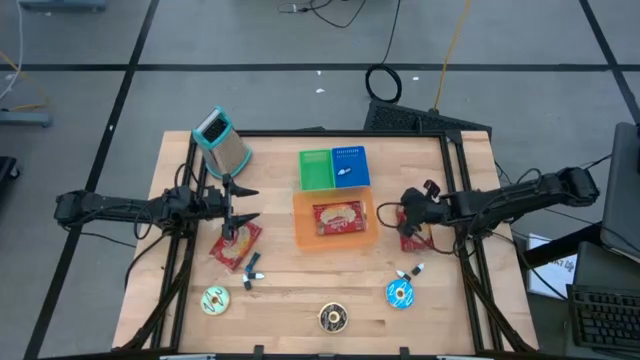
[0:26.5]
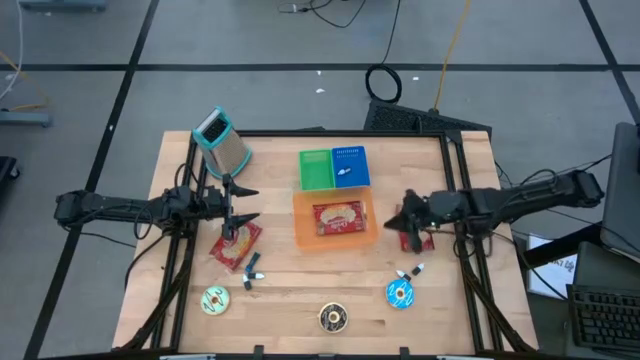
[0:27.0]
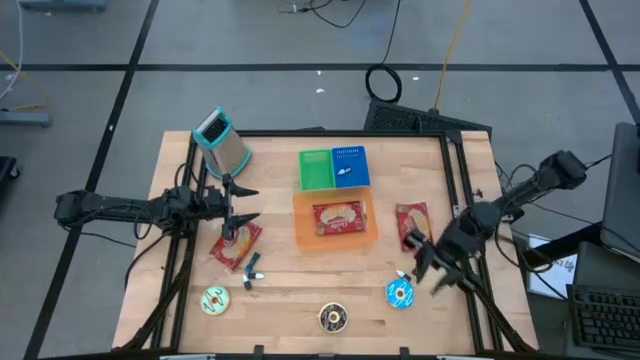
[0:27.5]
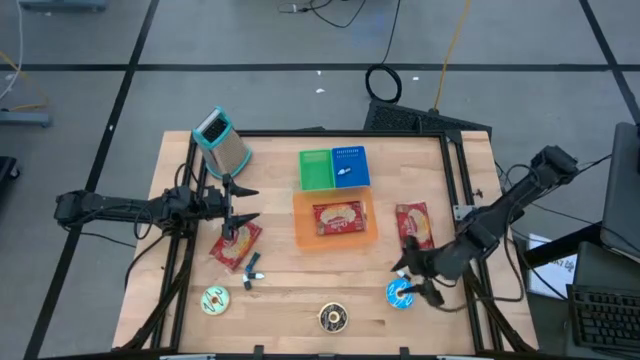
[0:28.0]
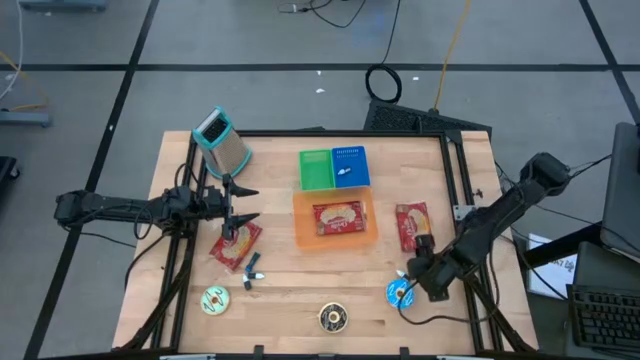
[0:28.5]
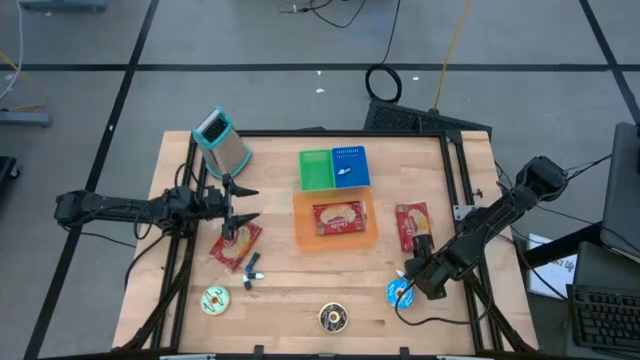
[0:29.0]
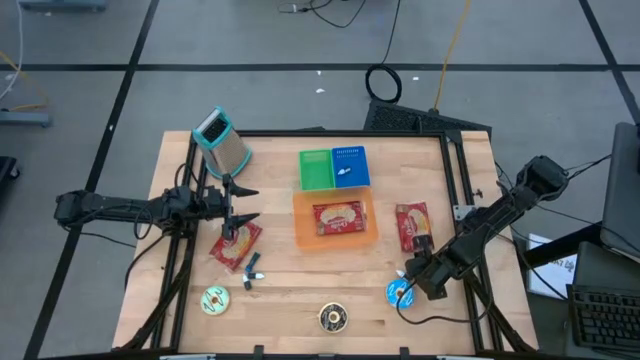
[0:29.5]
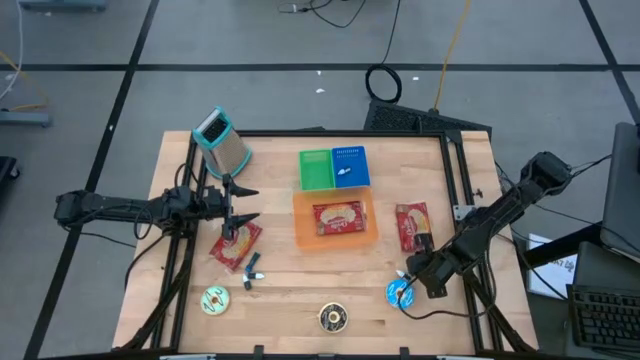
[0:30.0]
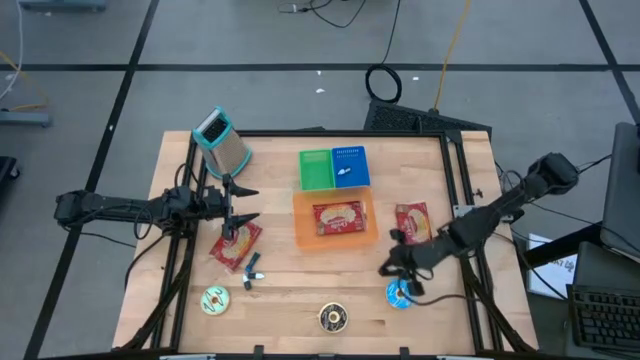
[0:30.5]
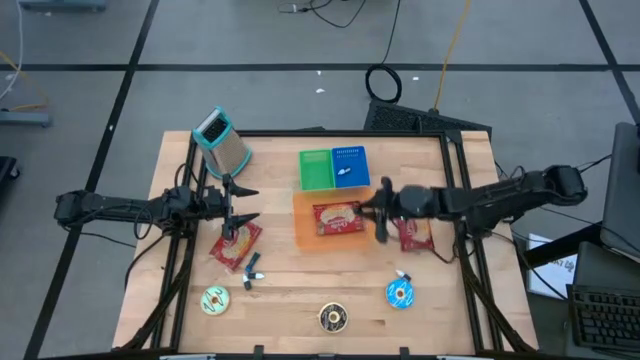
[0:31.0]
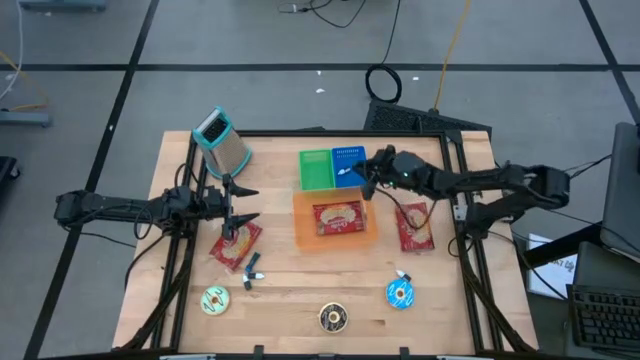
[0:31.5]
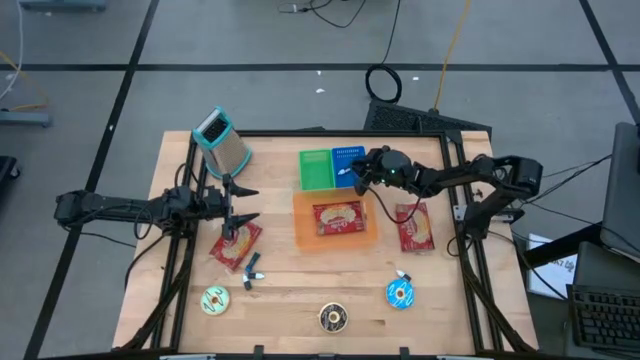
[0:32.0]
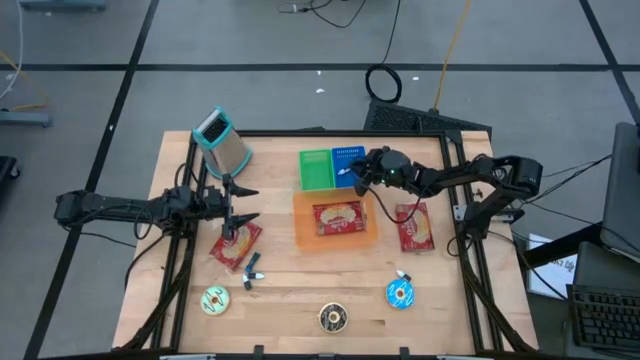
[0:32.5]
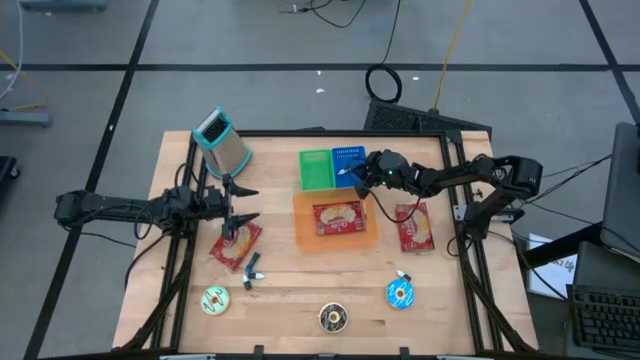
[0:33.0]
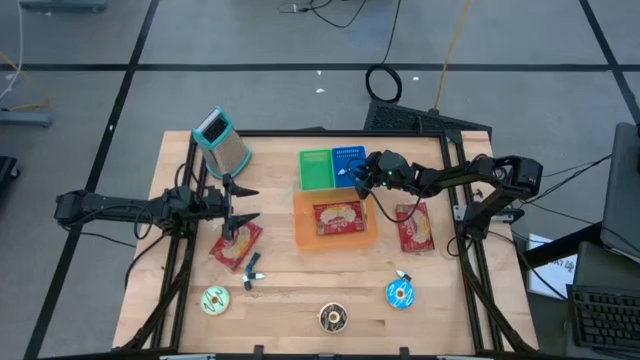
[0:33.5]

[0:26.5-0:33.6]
Put the right black food coloring bottle into the blue bin

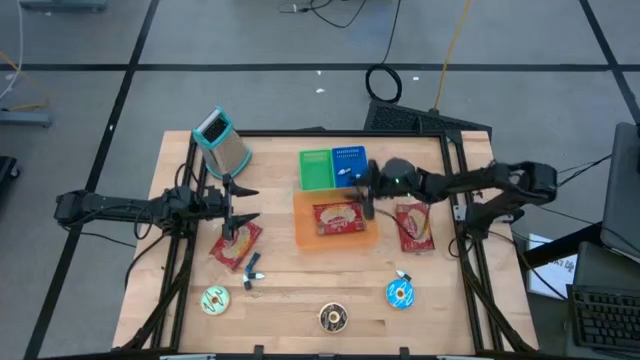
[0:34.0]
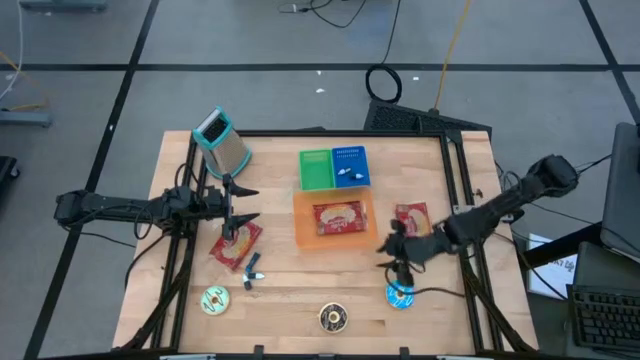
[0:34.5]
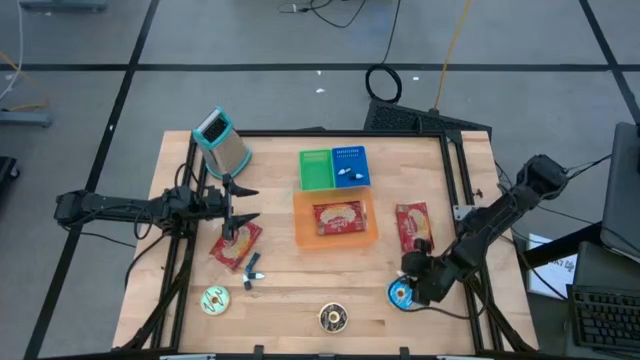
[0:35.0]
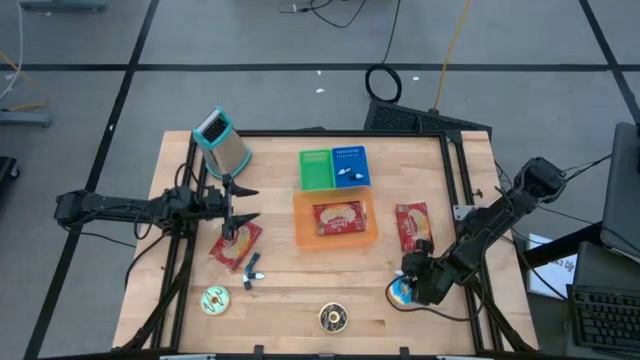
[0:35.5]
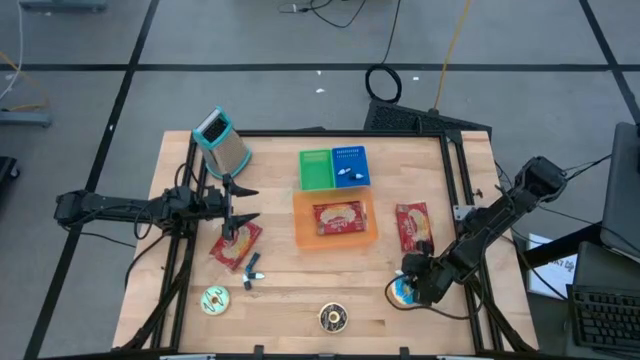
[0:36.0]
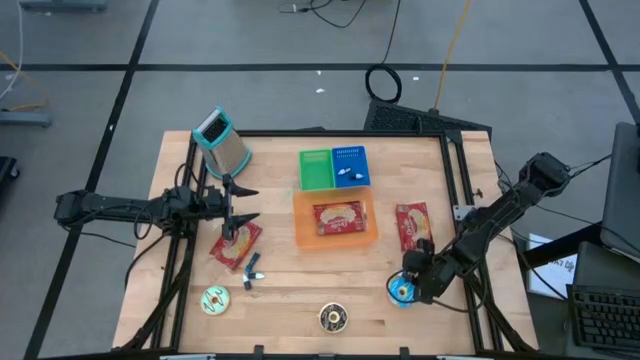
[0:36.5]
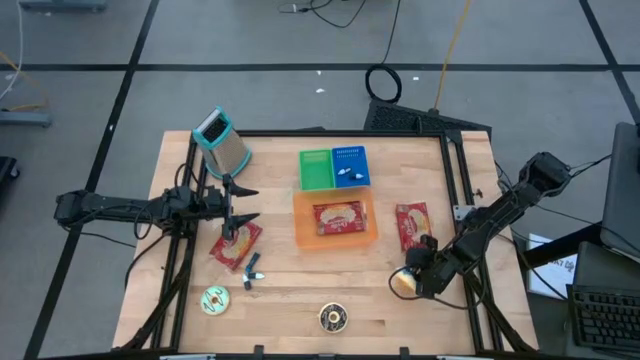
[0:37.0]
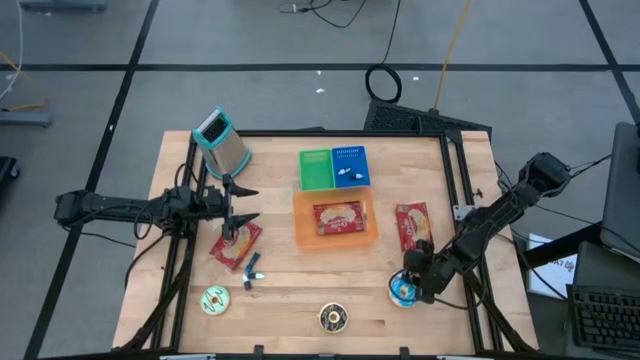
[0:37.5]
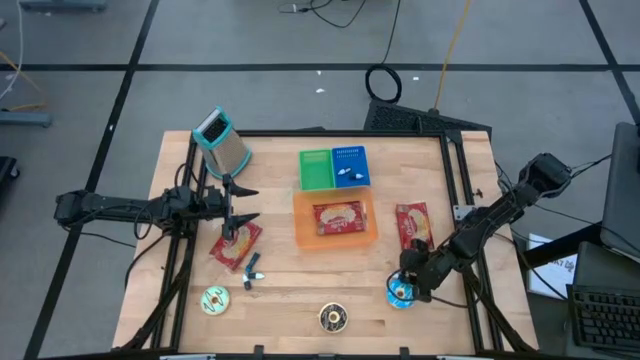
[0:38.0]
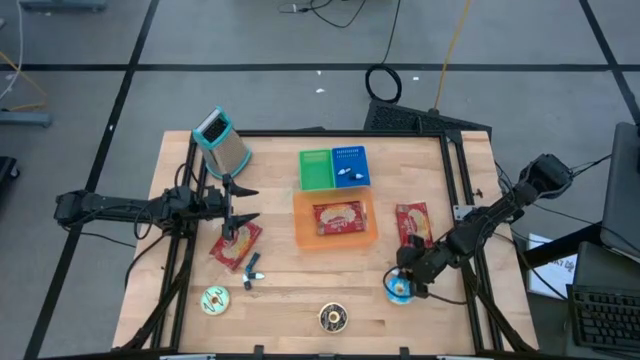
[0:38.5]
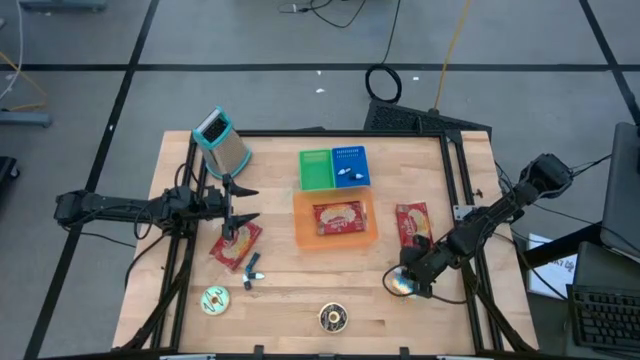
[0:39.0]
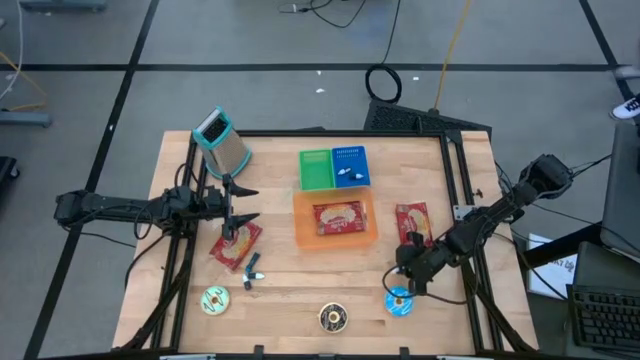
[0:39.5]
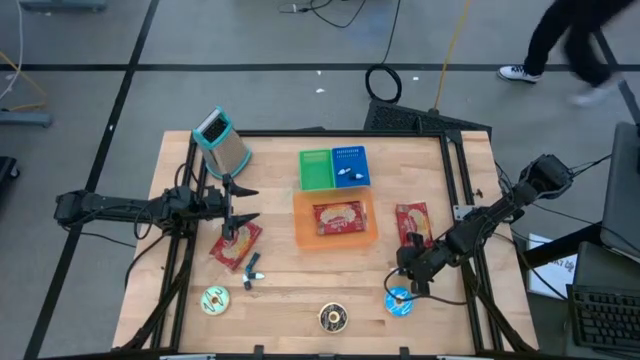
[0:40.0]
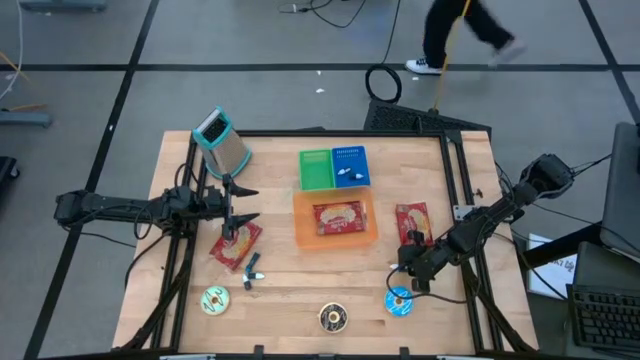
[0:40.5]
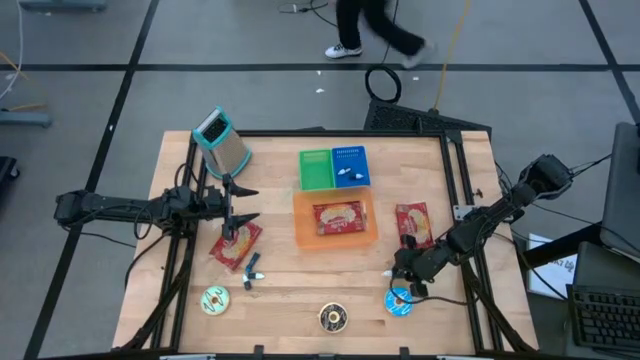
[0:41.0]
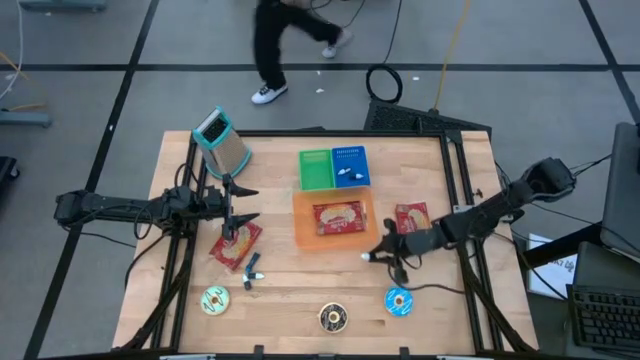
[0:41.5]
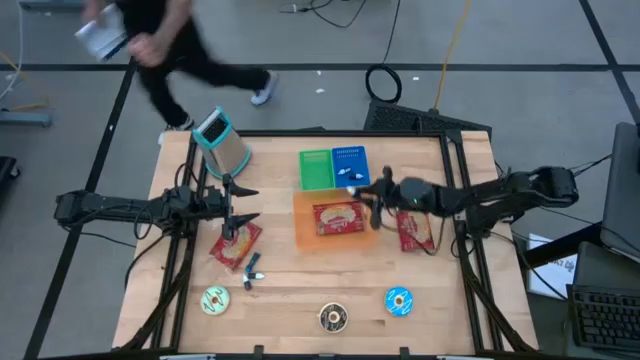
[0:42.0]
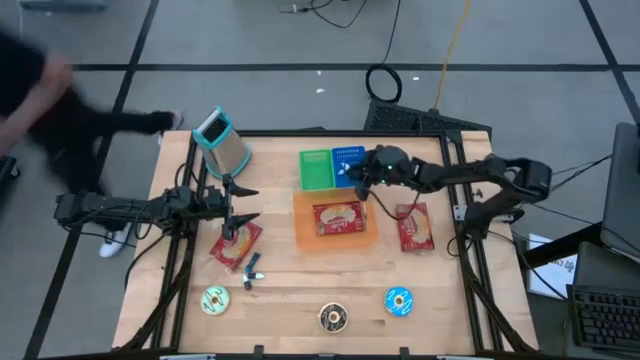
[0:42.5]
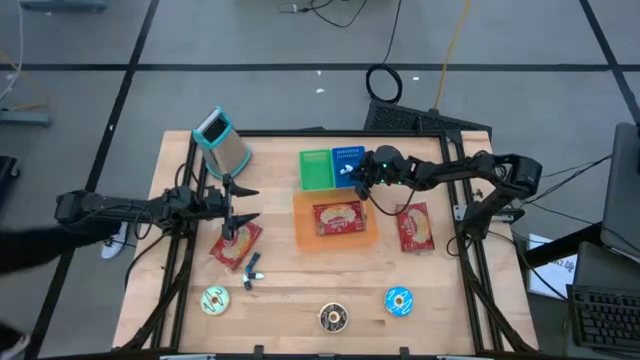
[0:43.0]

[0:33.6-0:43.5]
Put the right violet food coloring bottle into the blue bin

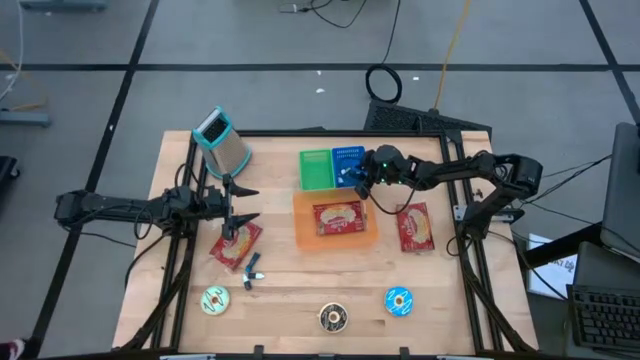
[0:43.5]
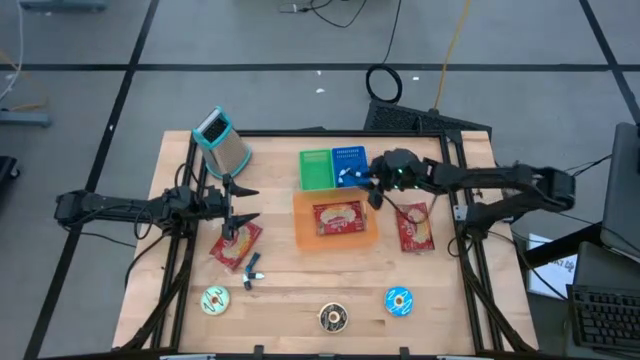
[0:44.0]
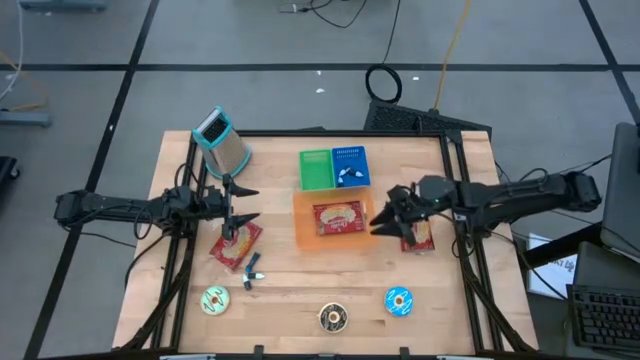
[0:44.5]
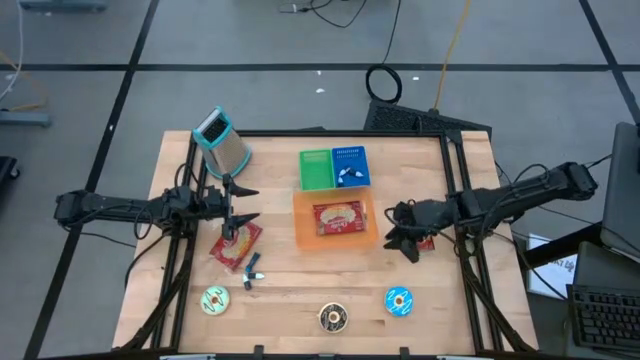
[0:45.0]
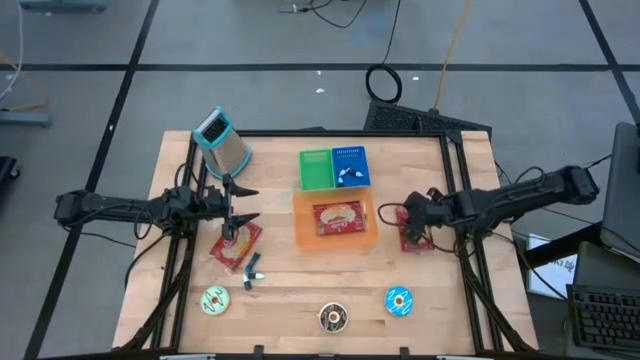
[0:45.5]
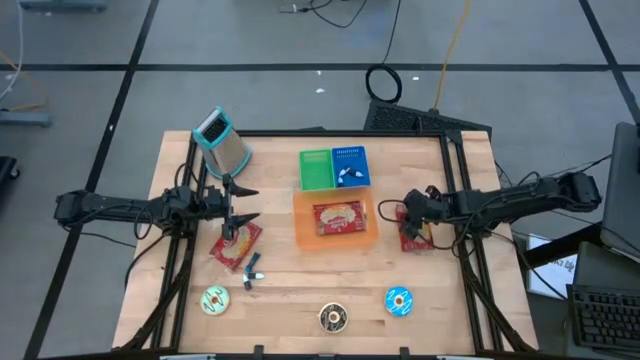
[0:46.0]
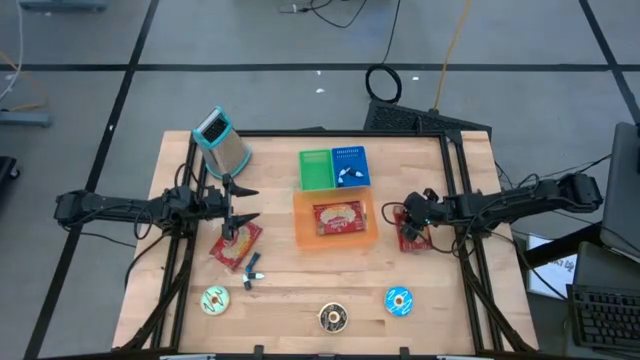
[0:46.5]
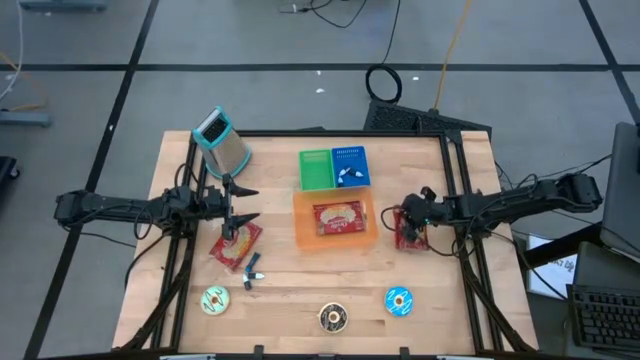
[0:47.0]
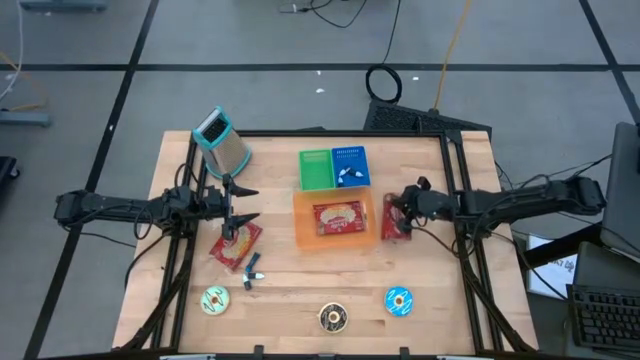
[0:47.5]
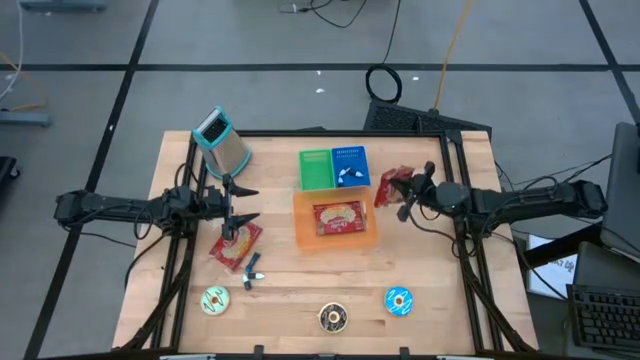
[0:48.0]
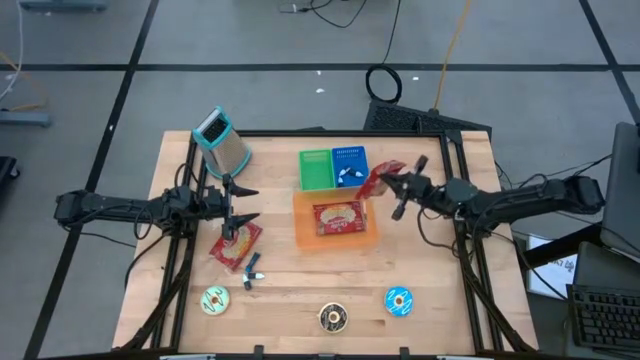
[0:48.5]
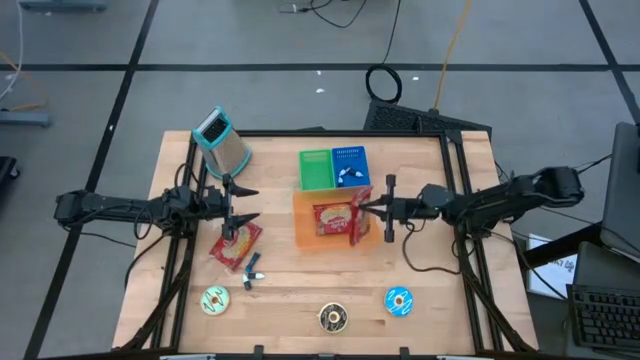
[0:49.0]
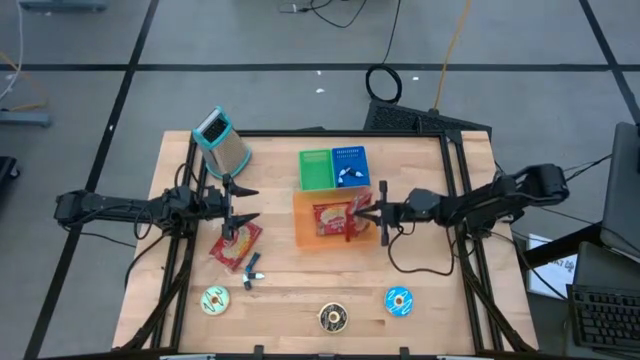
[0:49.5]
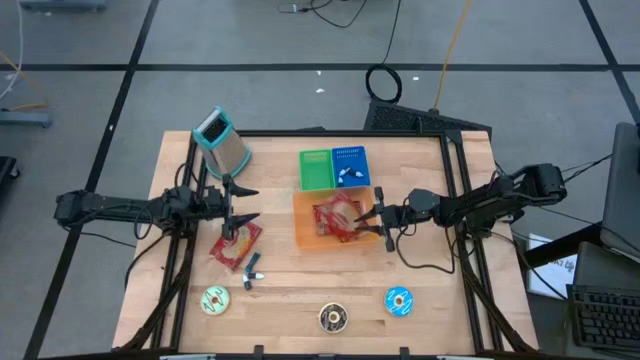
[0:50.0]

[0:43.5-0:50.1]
Put the right red popcorn bag into the orange bin
